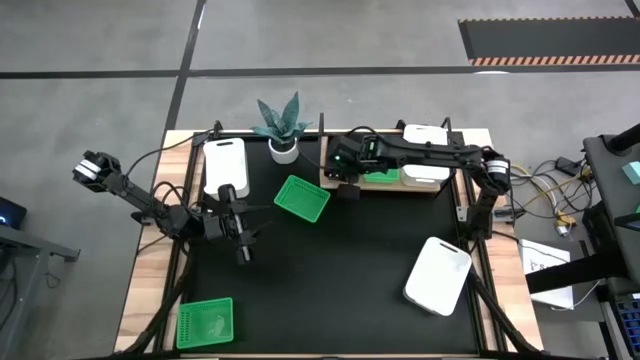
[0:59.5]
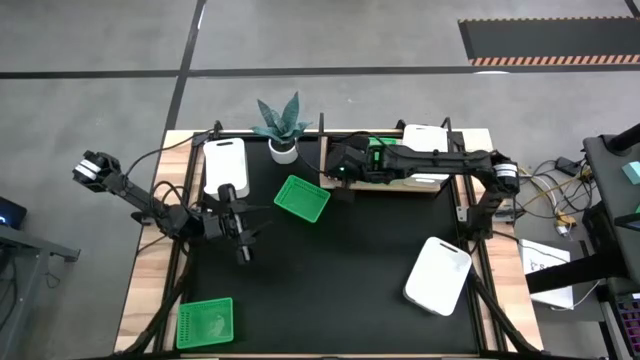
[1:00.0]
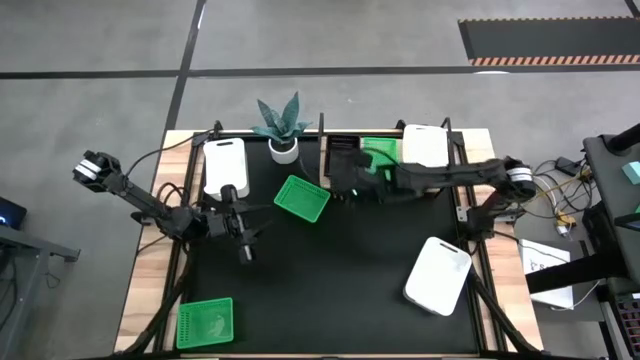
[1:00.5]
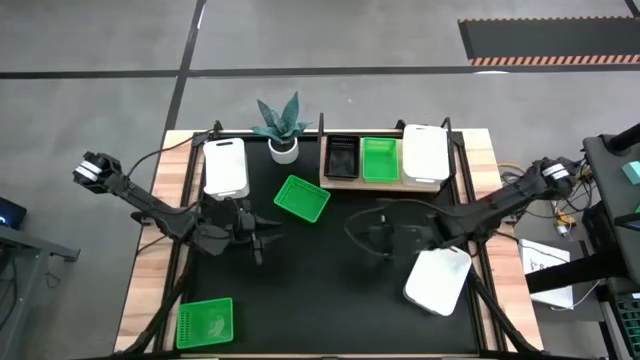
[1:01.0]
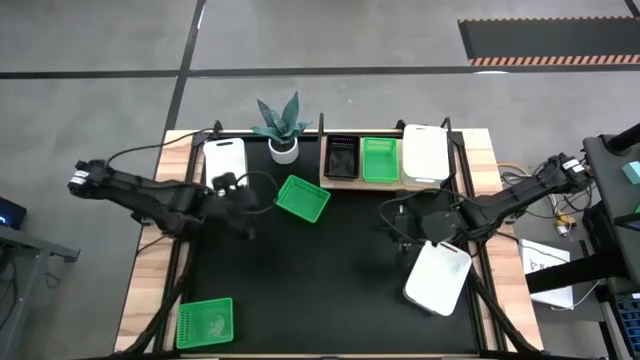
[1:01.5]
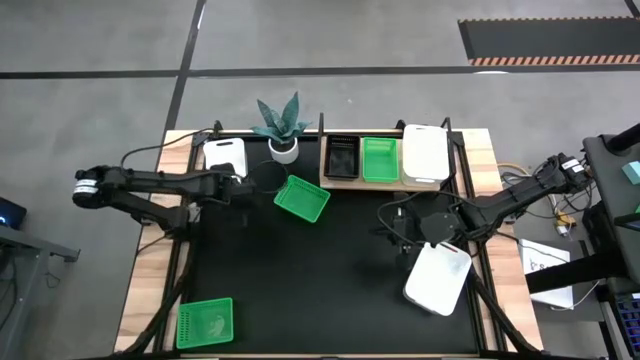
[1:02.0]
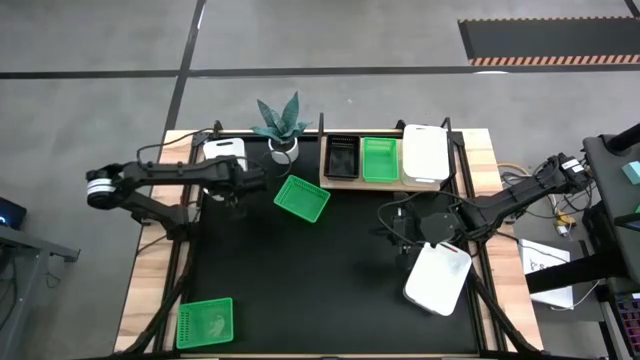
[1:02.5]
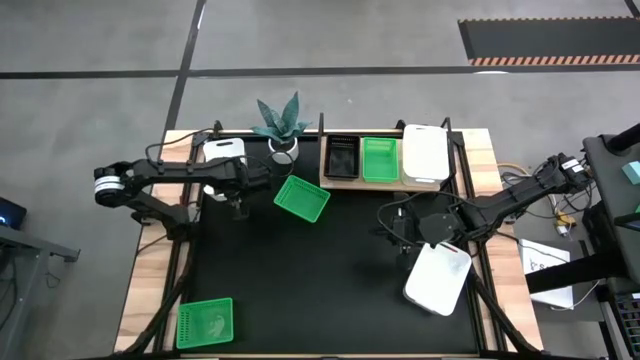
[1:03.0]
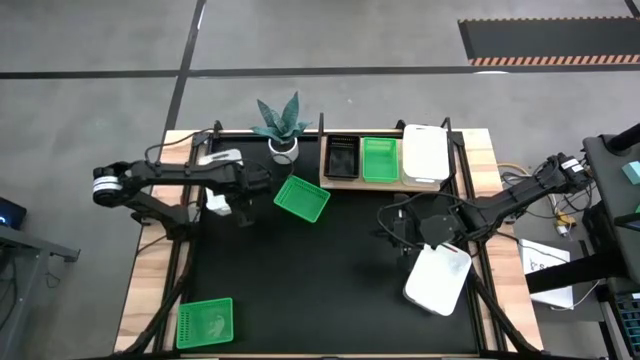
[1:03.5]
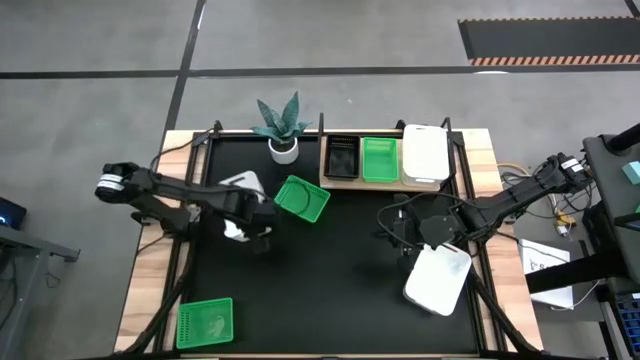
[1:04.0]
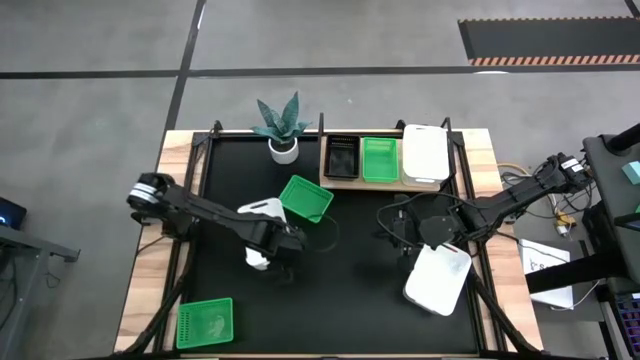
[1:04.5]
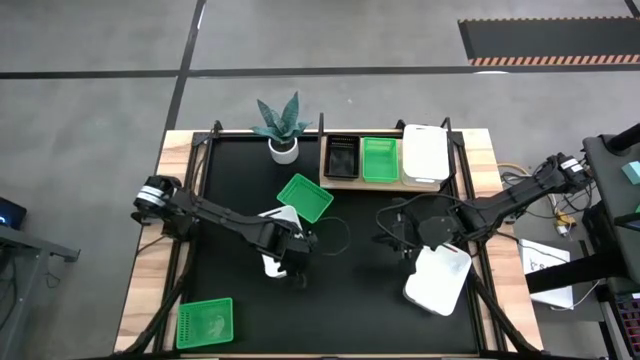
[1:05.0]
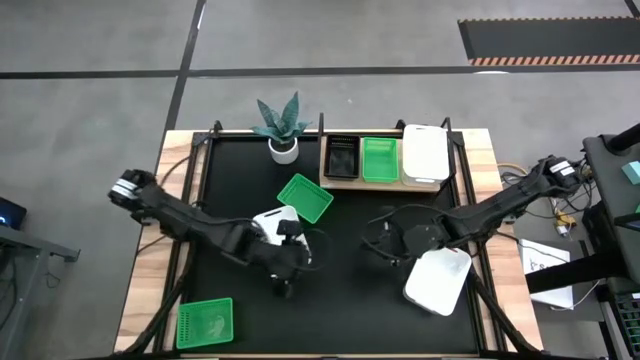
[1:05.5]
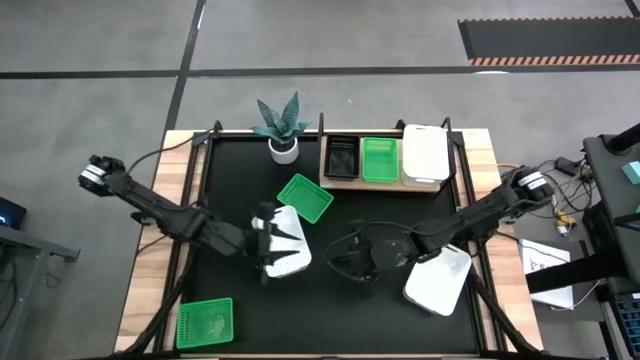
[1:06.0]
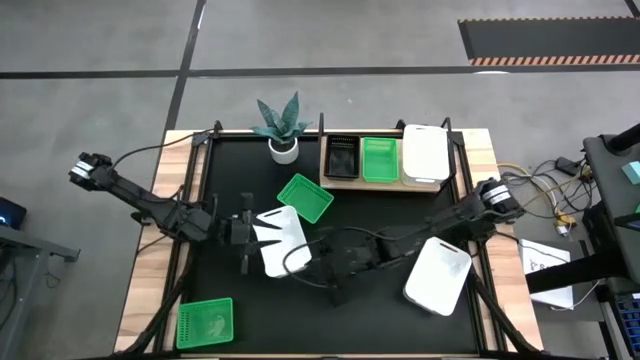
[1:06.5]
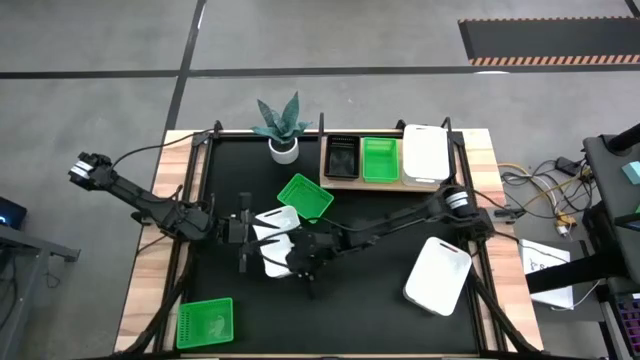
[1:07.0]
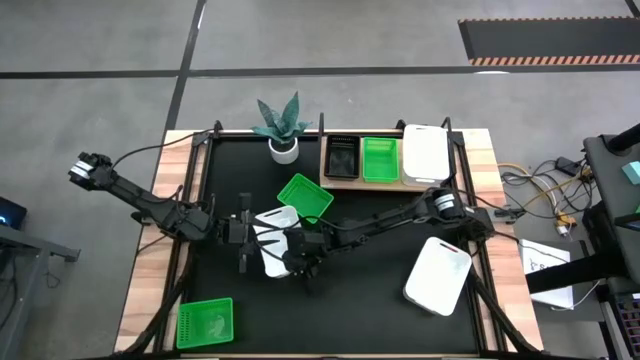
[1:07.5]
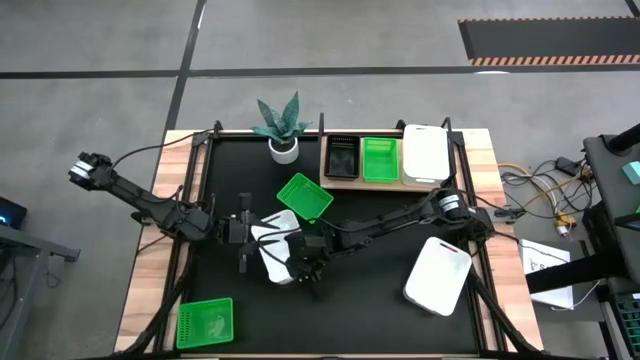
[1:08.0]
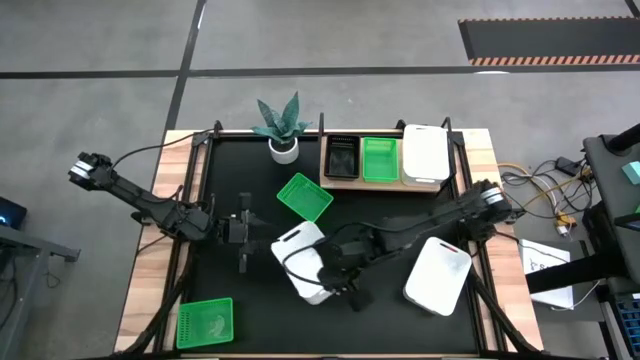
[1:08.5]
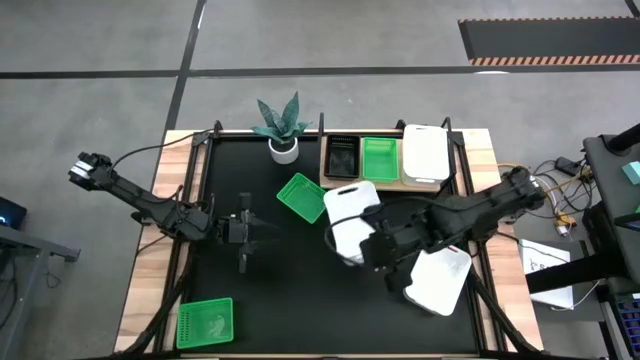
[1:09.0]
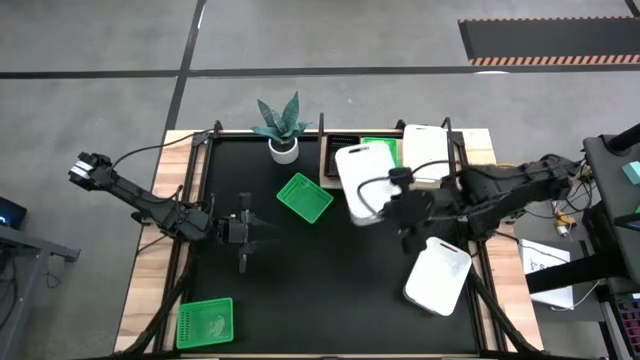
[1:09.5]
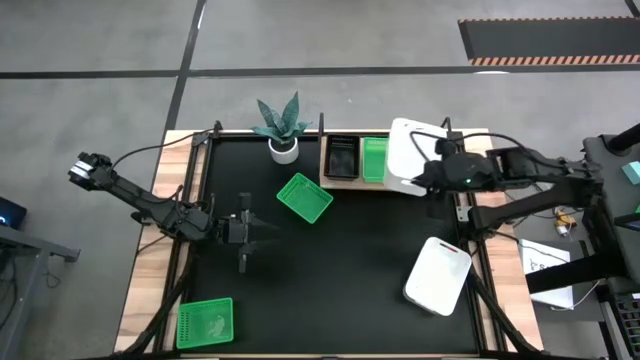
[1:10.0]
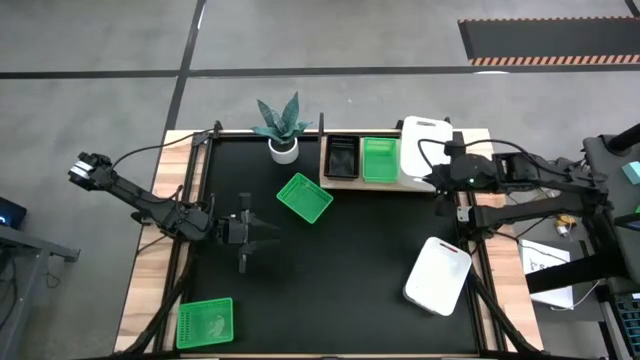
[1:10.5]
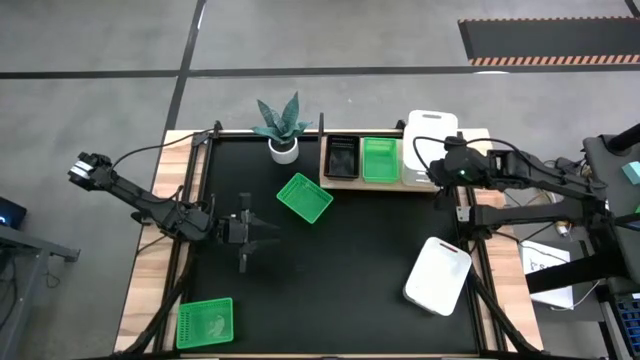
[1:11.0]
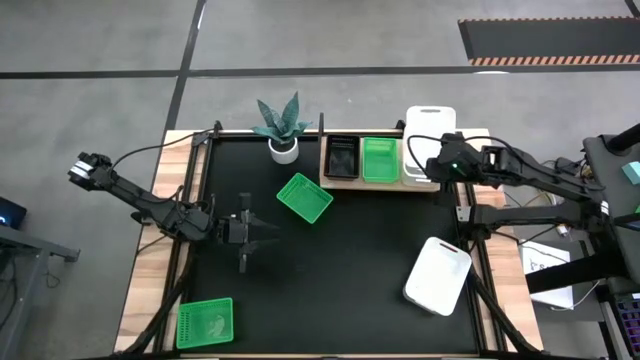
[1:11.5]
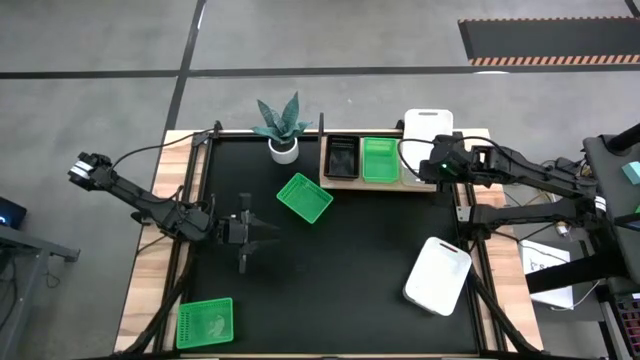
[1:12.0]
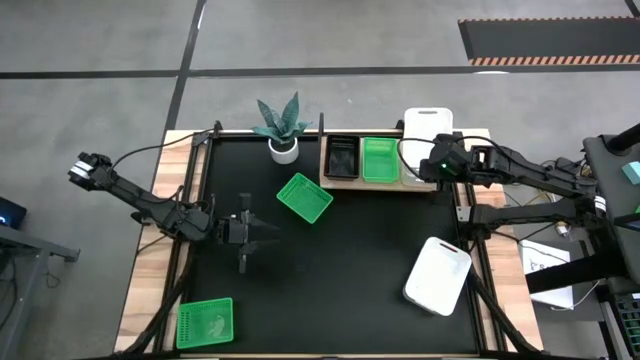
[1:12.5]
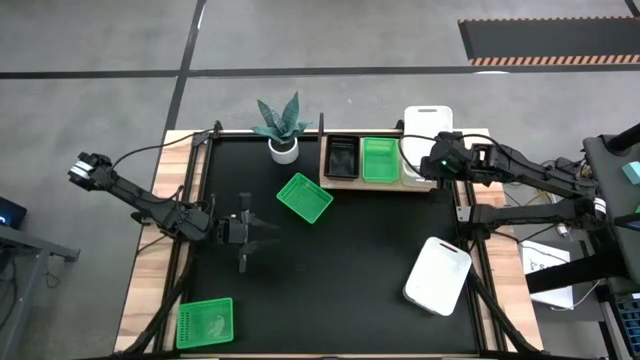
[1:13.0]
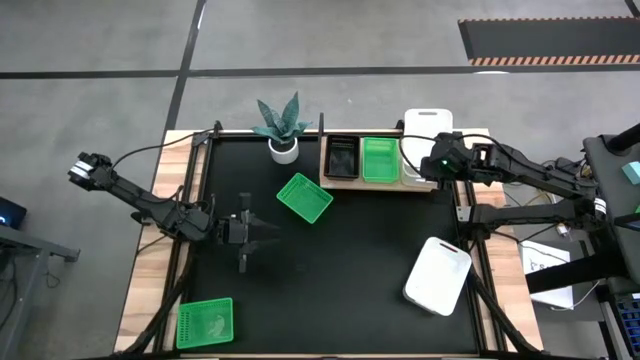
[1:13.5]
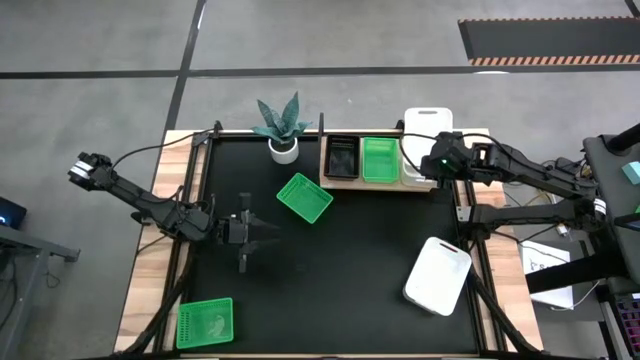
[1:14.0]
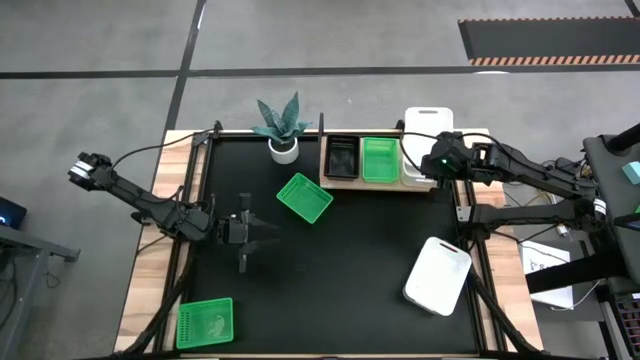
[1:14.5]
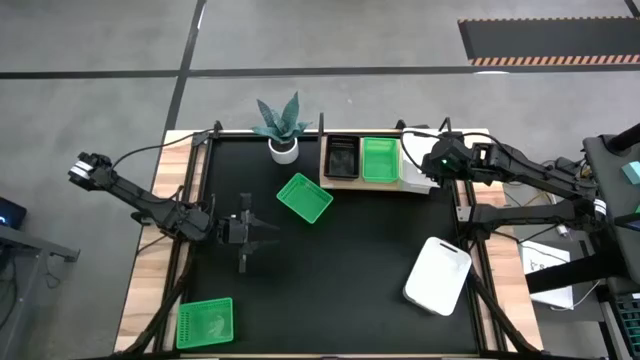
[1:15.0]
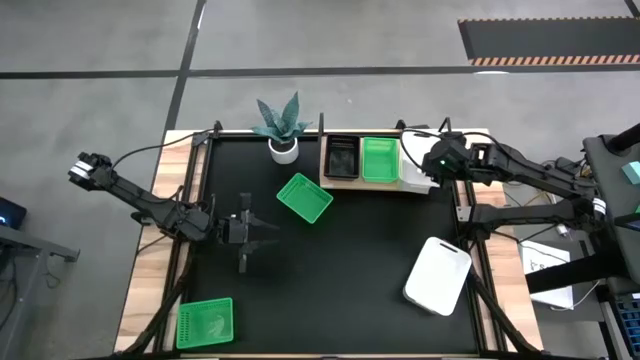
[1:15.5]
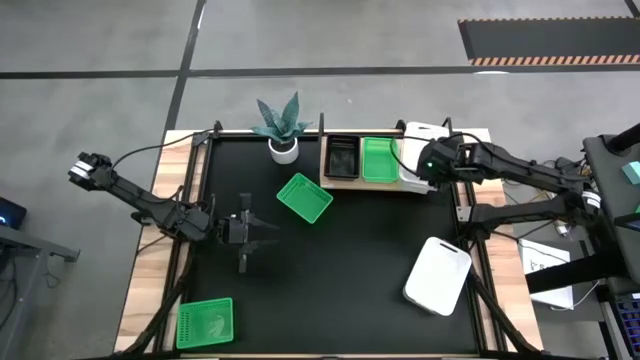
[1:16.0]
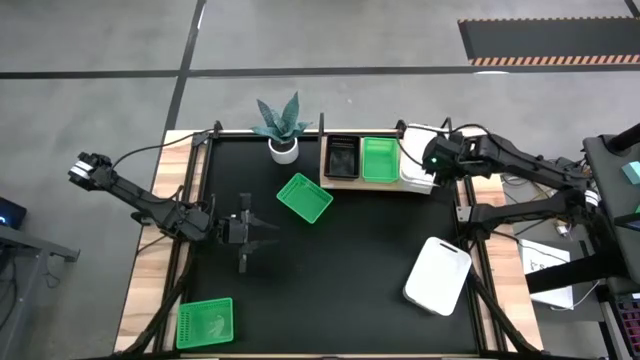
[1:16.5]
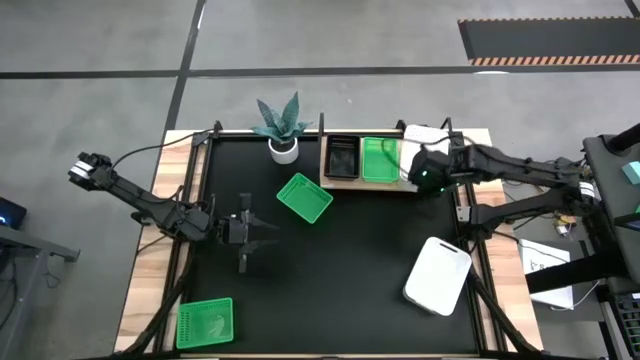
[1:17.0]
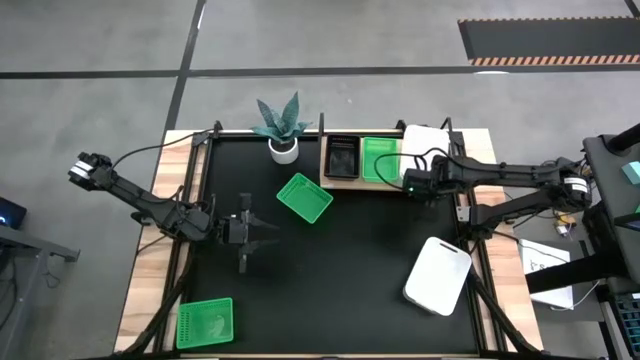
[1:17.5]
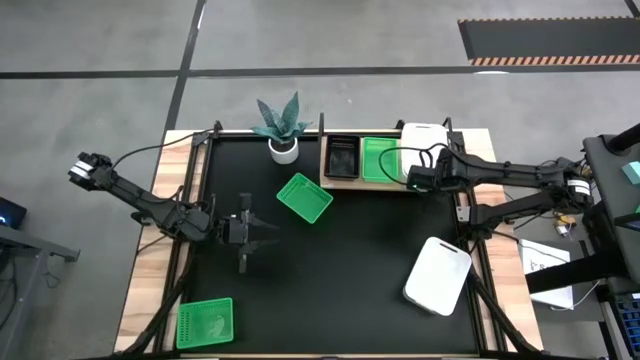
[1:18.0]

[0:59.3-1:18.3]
Task: Stack baskets on shelf by color
Stack the left white bin on the white bin on the shelf

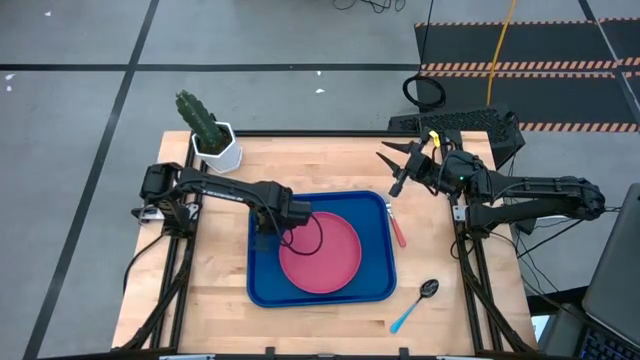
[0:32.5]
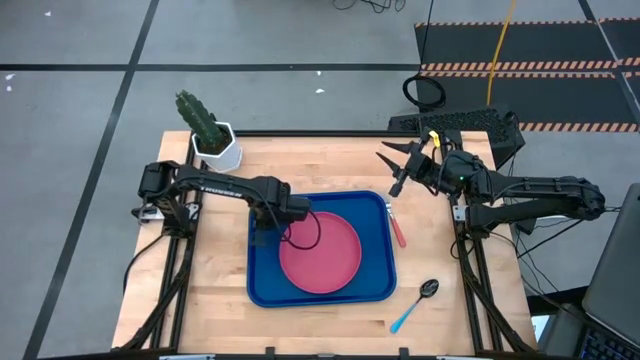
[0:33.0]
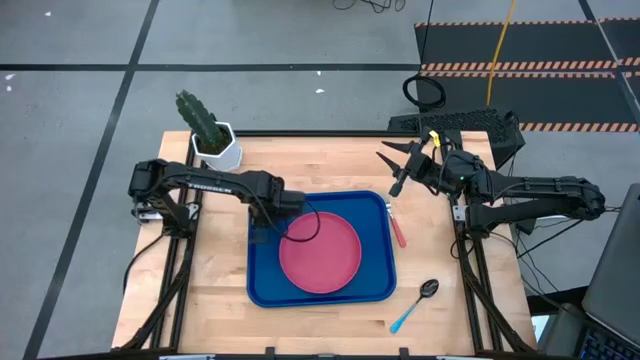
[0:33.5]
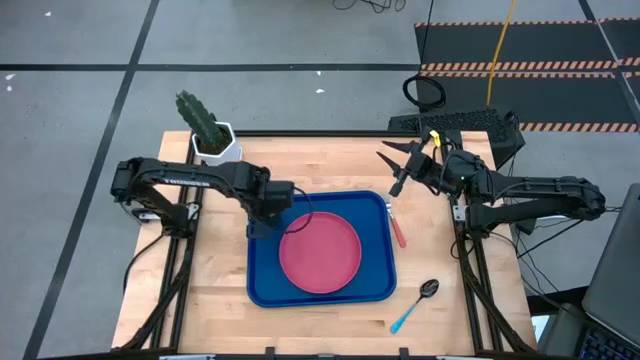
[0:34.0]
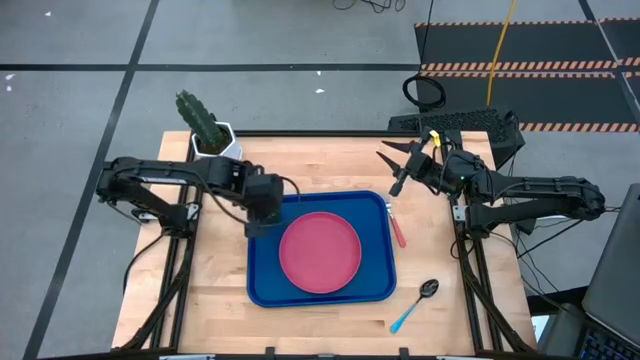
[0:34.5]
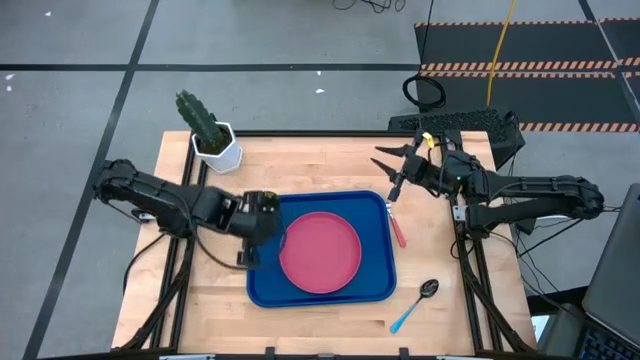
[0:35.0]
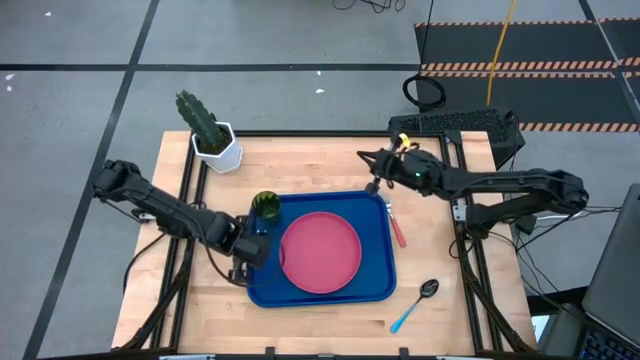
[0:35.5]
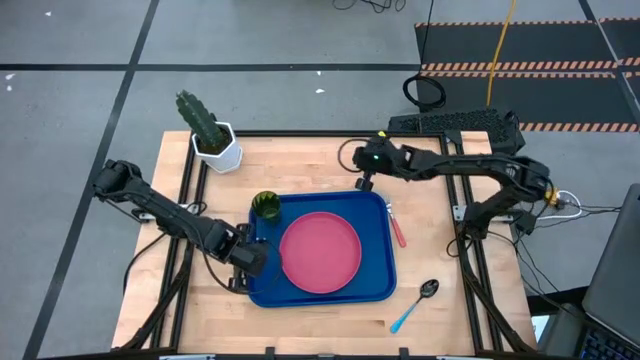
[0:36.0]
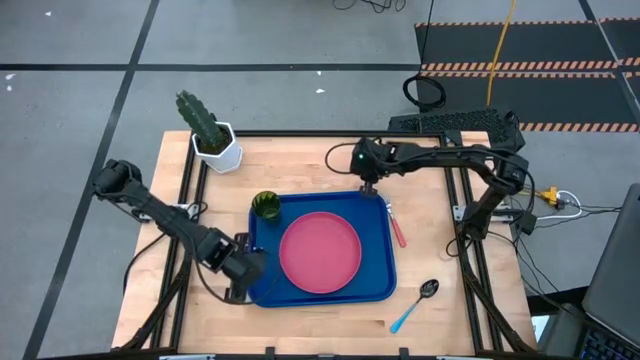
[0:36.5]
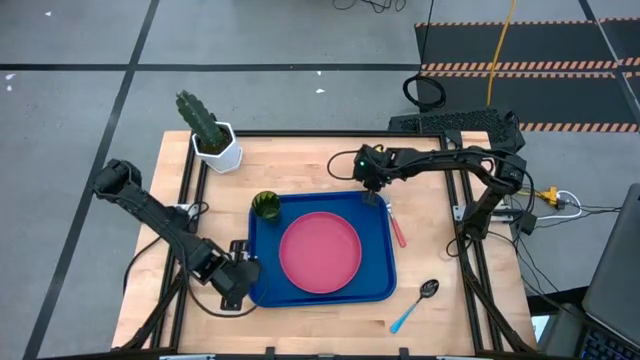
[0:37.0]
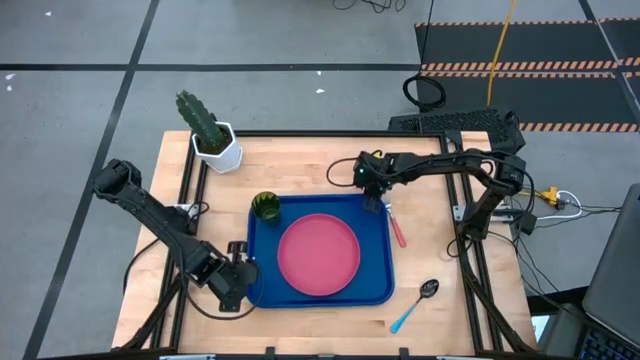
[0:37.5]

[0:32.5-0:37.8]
Task: Pick and place plate/cup/fork/spoon on tray
Adjust the blue serving tray
